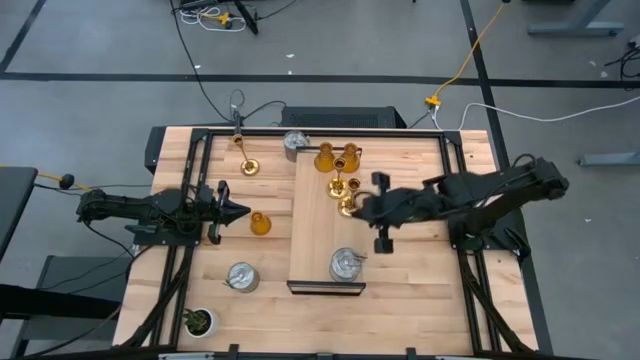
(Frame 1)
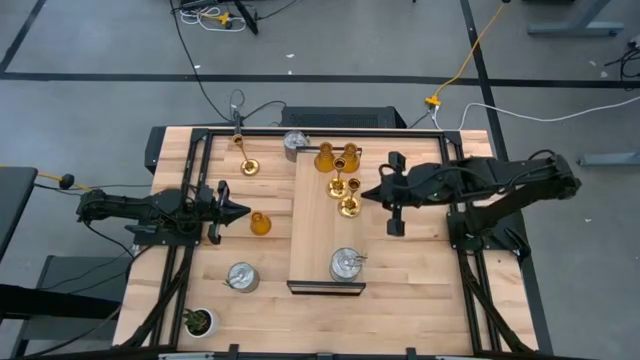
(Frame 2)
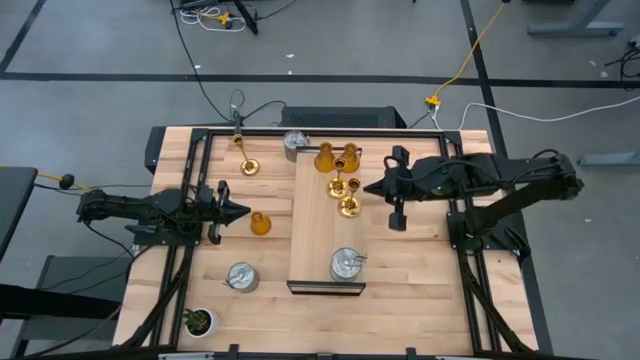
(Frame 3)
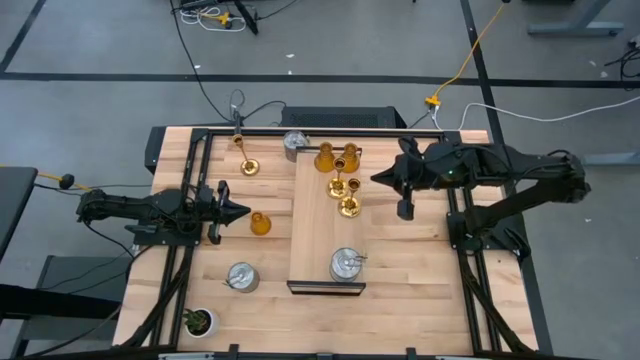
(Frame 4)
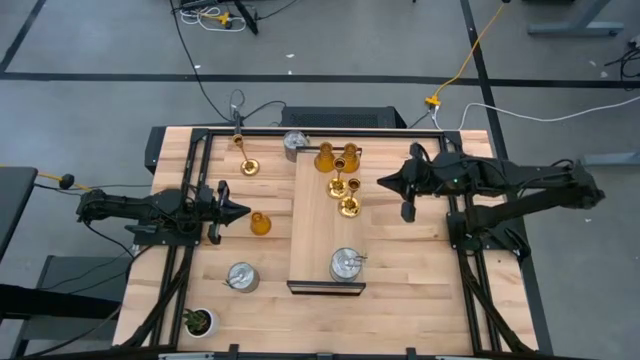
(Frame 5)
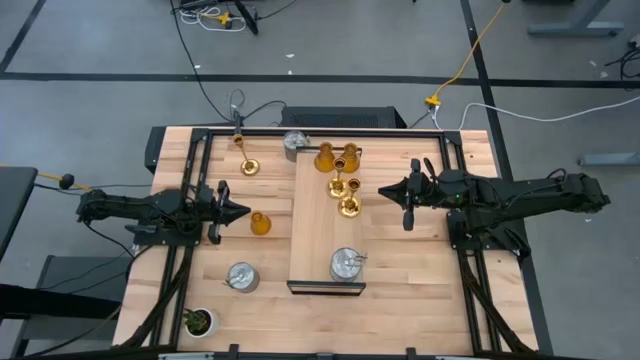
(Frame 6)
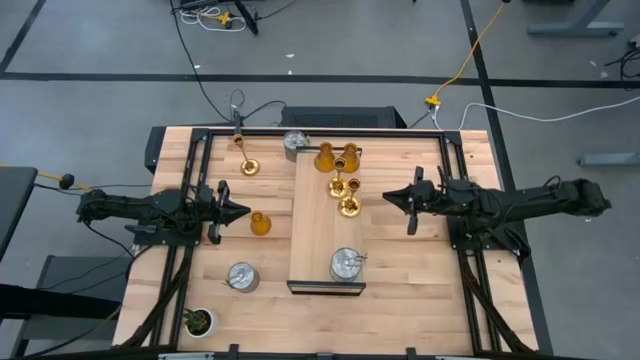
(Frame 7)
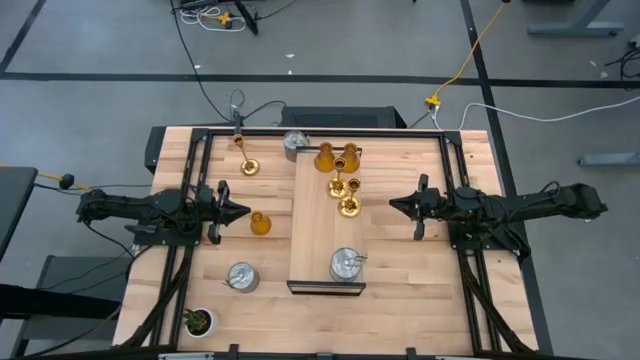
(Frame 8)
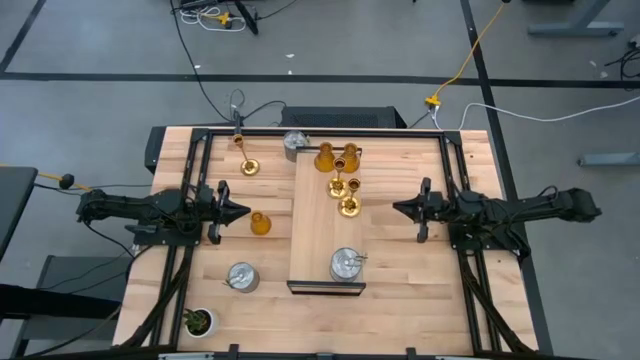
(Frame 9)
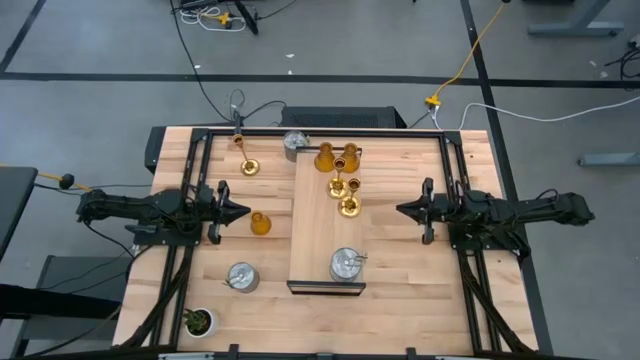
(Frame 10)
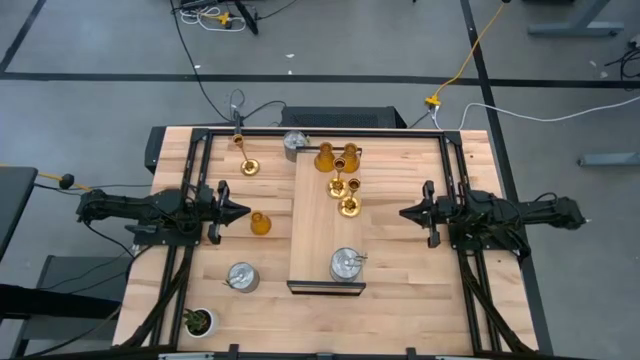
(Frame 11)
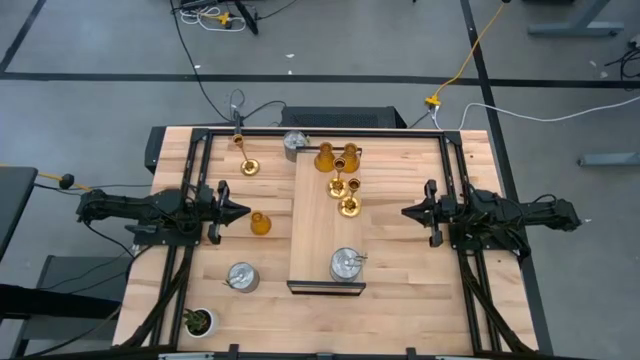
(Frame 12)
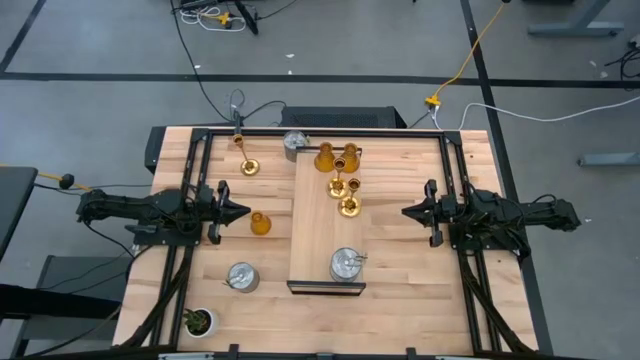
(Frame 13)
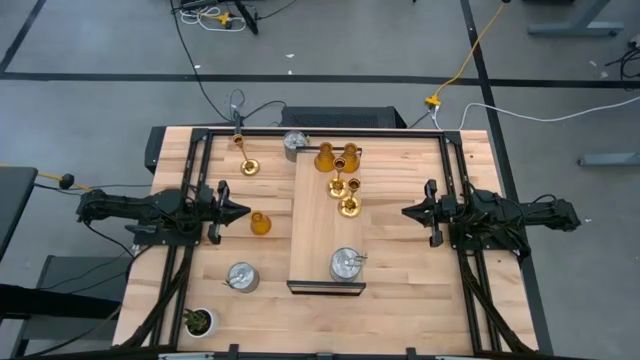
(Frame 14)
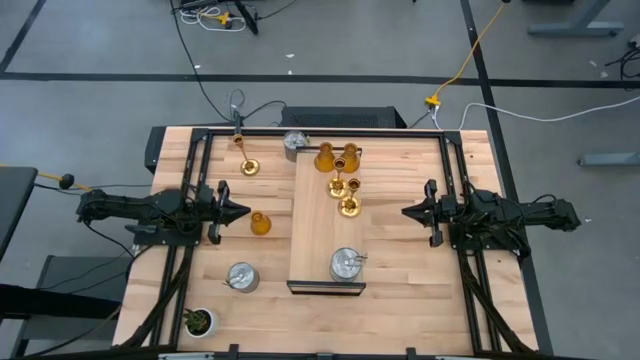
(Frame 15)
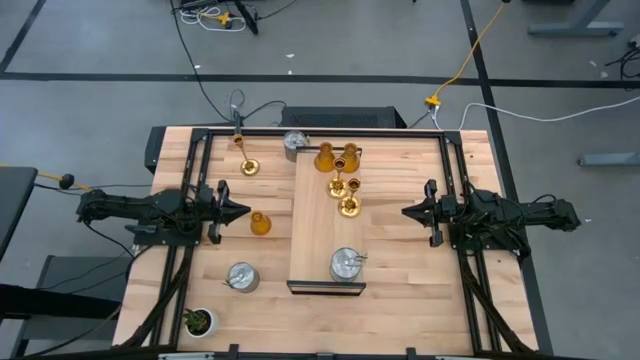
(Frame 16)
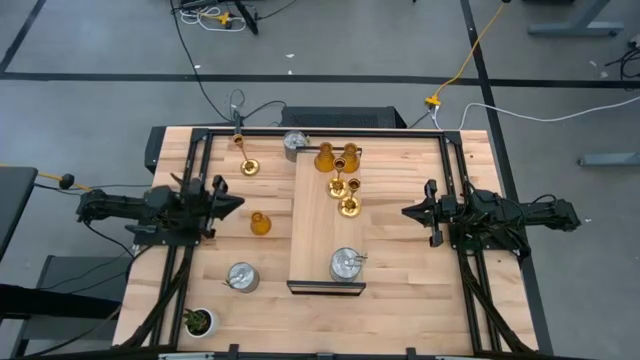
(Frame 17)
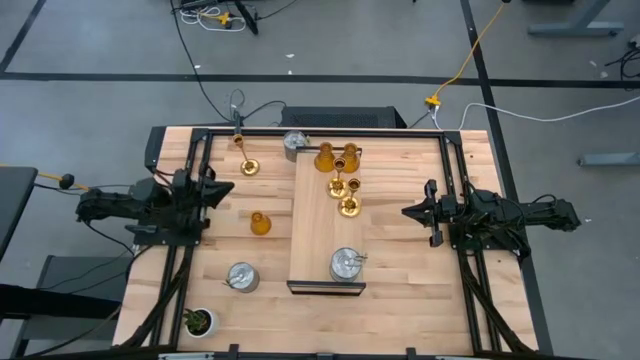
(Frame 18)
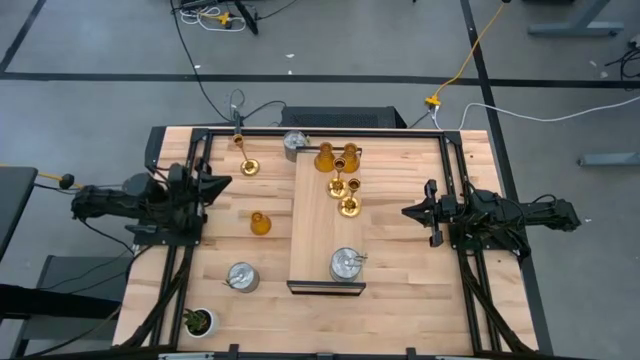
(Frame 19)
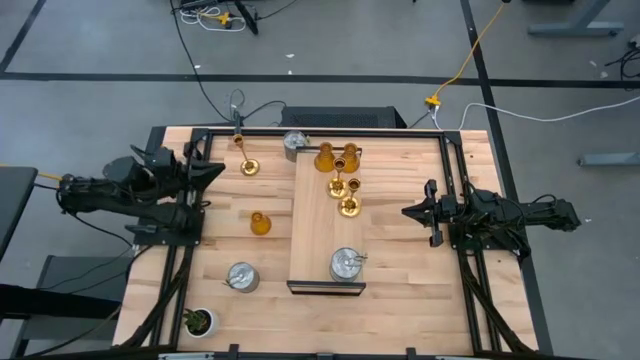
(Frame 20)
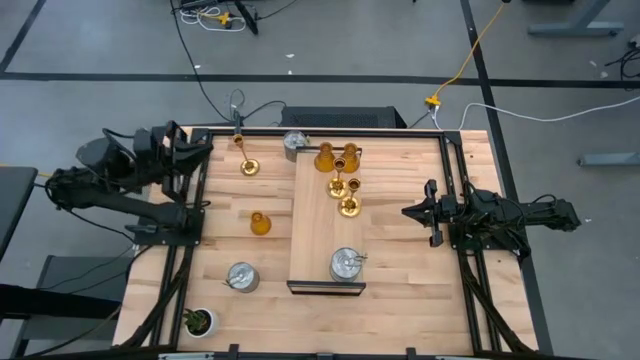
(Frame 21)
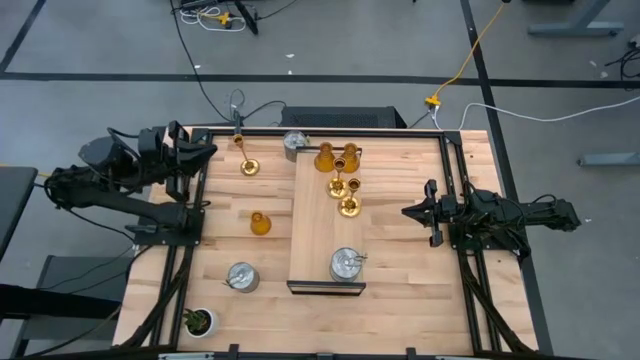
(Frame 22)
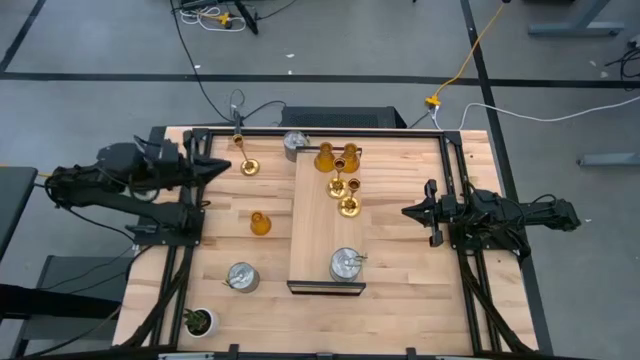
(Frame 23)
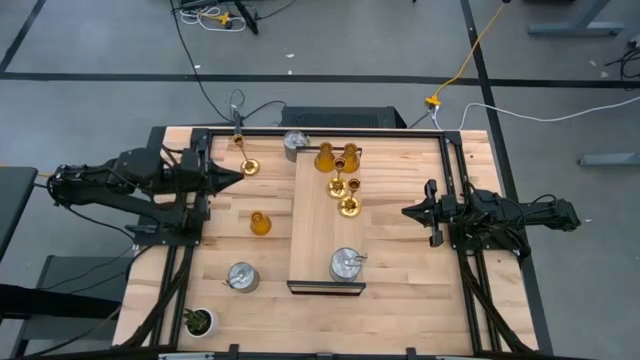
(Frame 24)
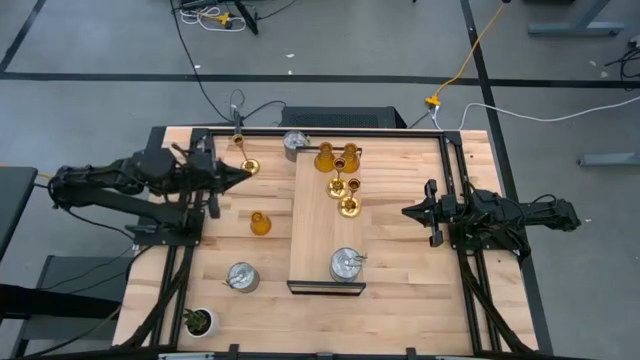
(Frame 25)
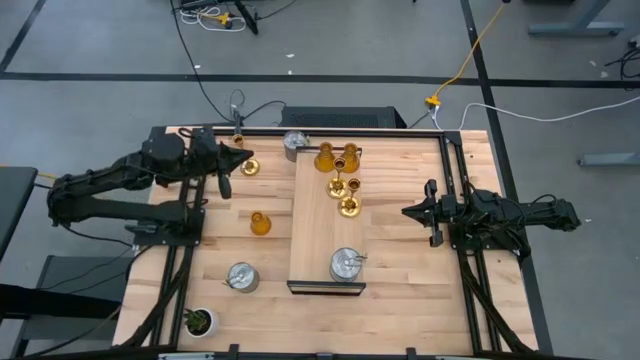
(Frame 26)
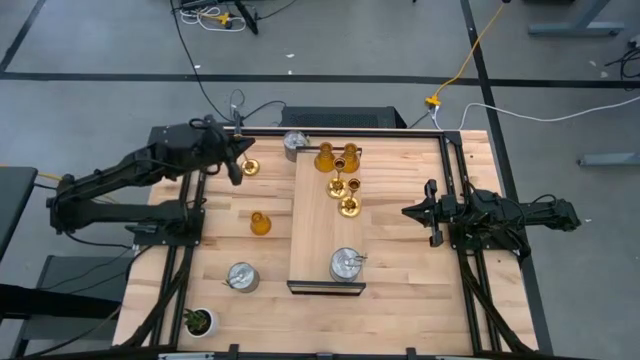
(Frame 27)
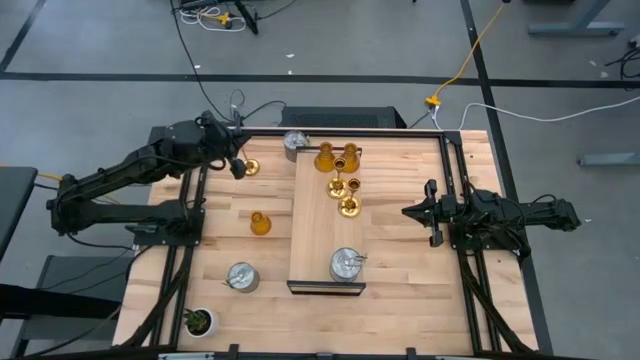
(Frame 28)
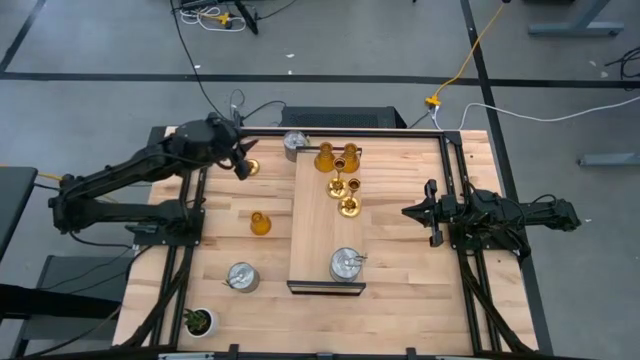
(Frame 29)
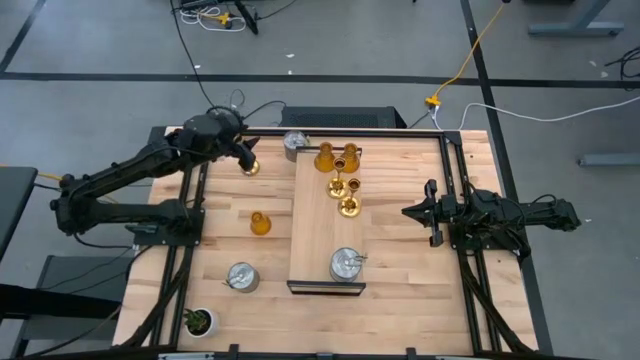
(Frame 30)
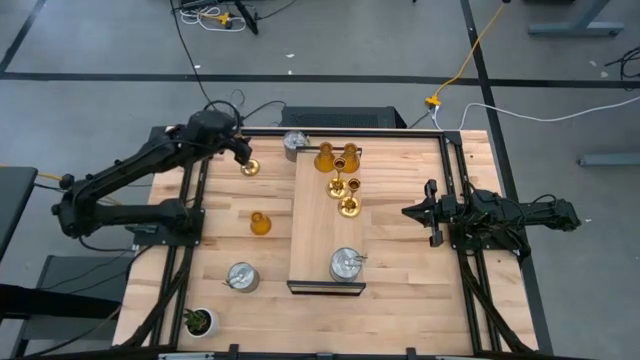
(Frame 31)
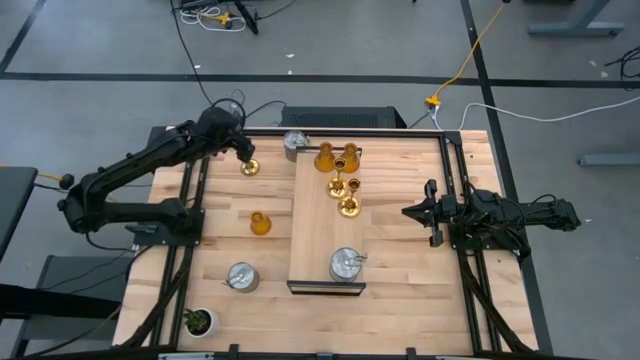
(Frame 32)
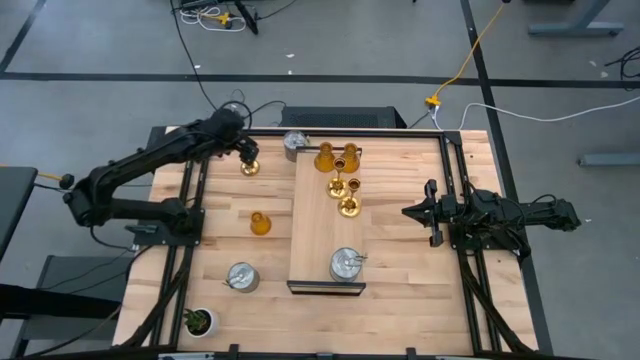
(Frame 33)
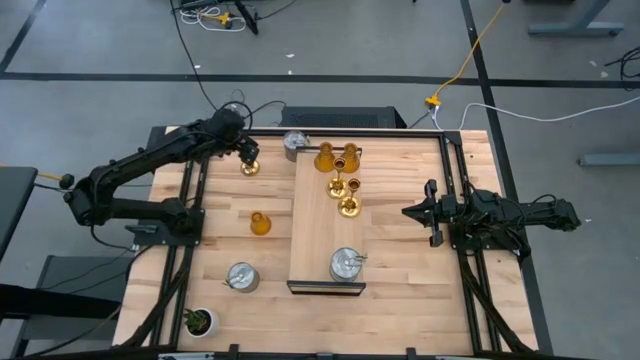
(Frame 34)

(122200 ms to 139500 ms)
Task: Pick & Place candle stick holders
Put the candle holder on the shelf aligned with the other candle holder

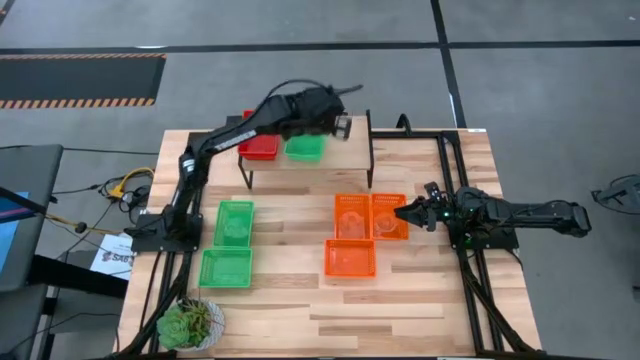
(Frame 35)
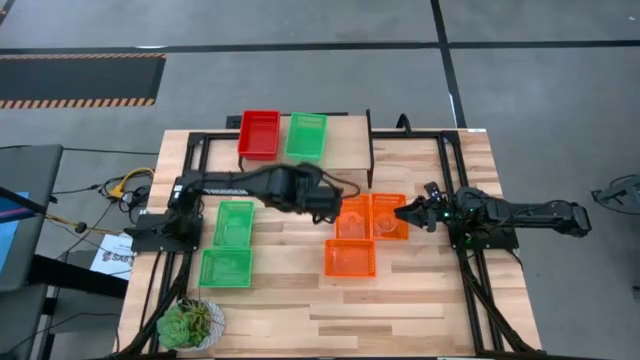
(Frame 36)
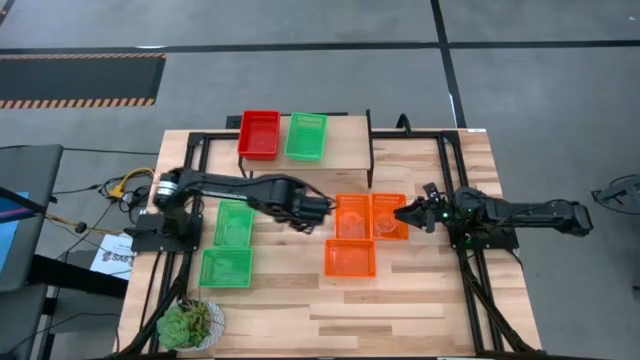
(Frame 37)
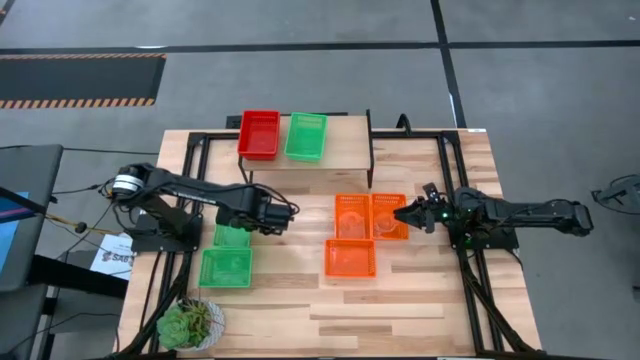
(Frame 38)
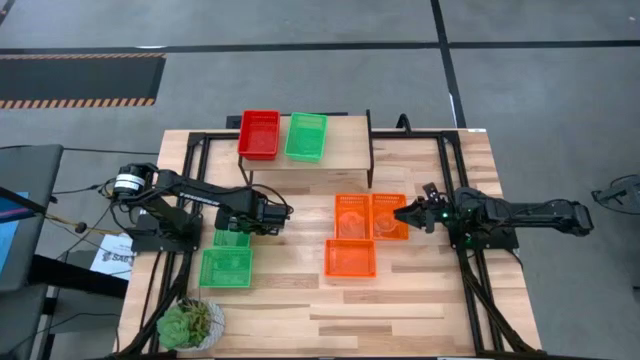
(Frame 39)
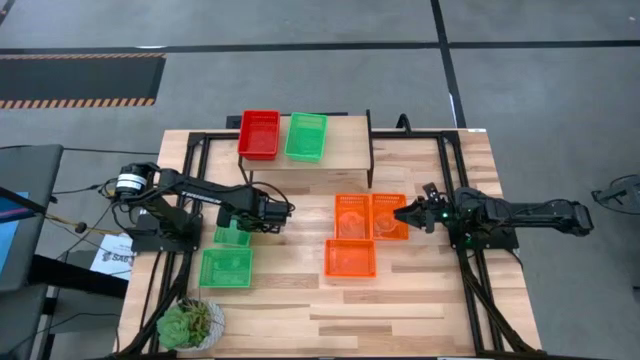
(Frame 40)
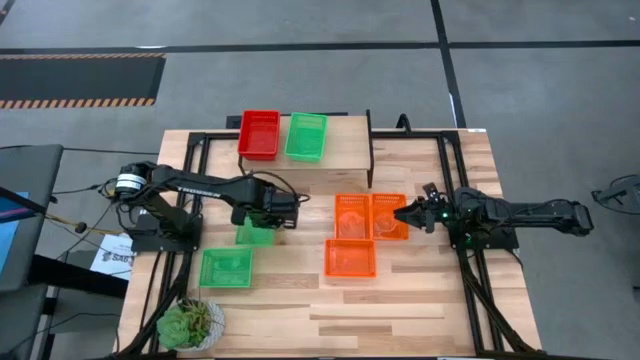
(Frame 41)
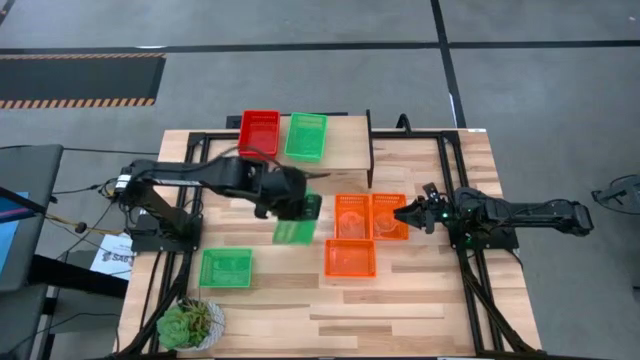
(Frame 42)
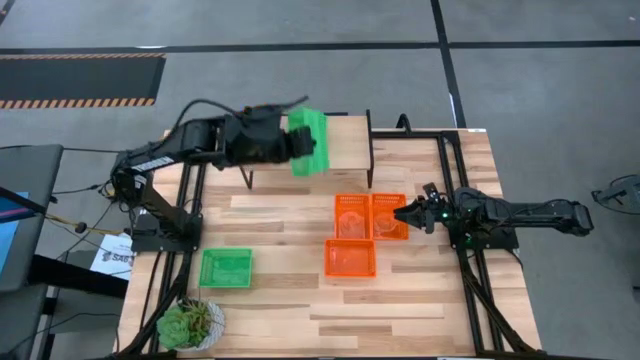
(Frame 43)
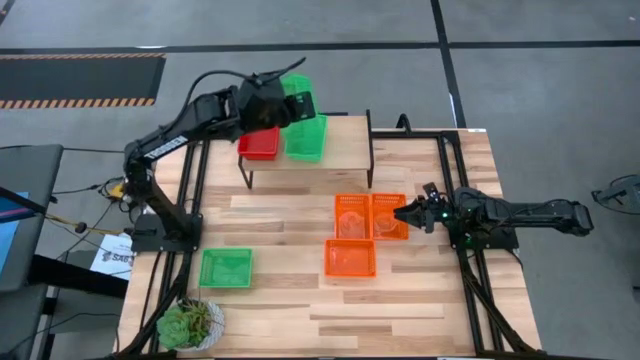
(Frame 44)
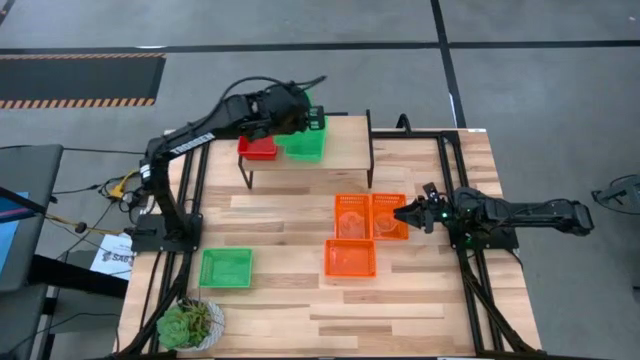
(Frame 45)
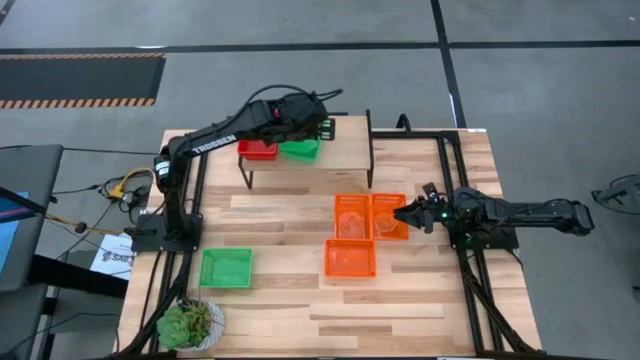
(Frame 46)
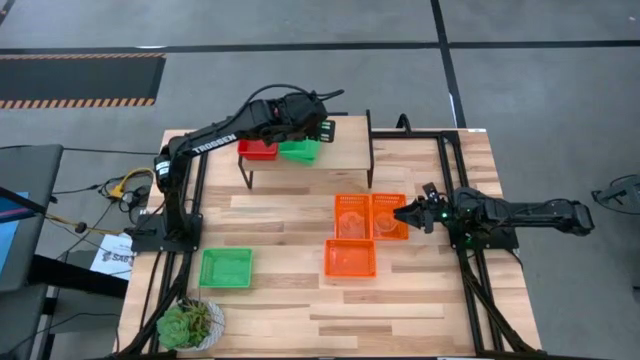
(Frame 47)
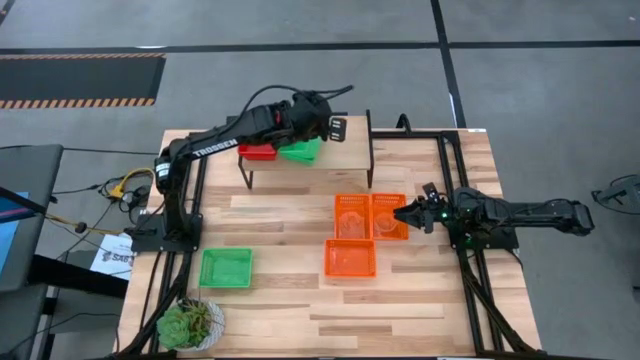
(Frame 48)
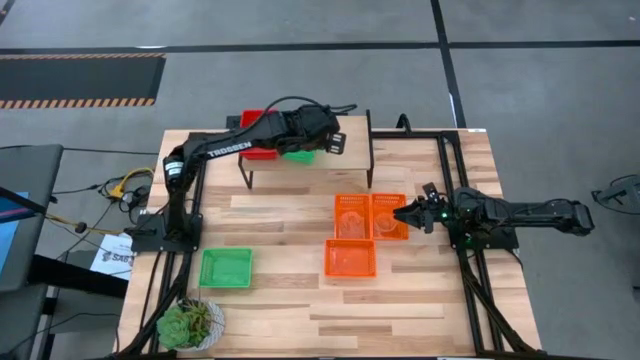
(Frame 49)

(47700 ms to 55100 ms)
Task: Stack baskets on shelf by color
Stack the top green bin on top of the green bin on the shelf
